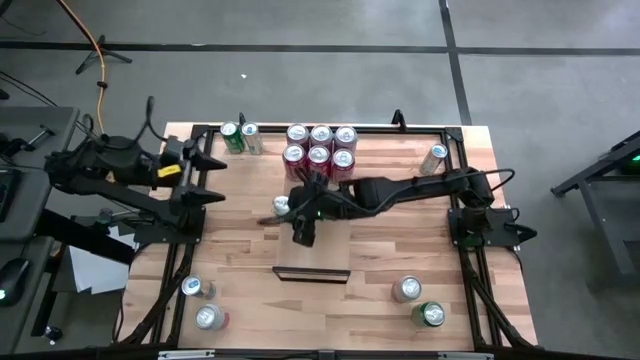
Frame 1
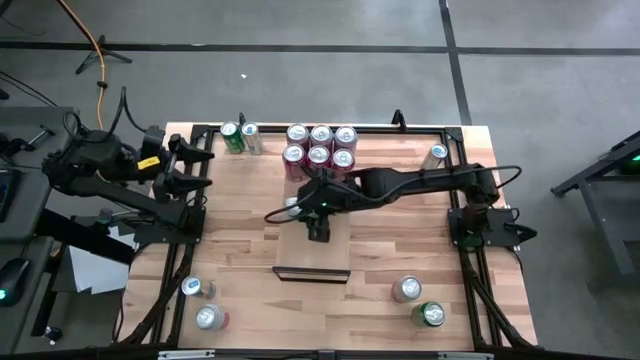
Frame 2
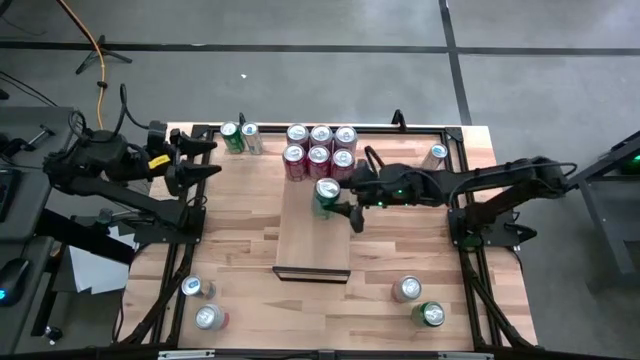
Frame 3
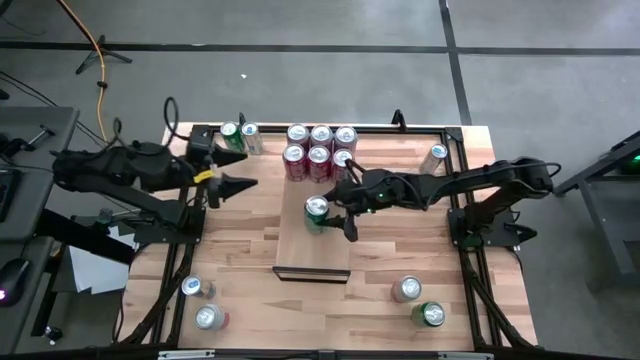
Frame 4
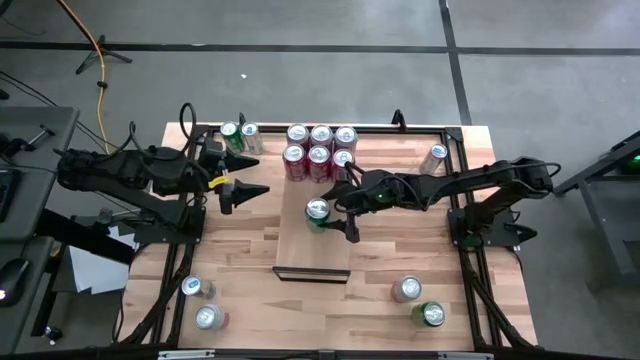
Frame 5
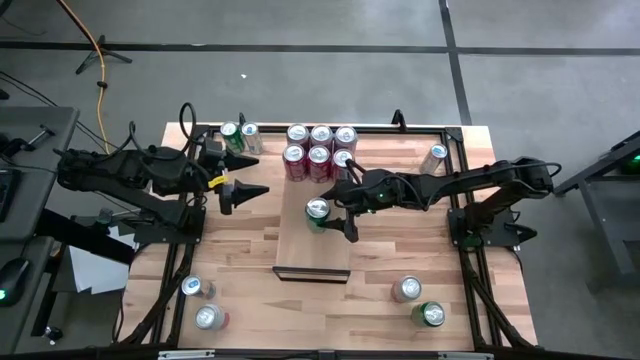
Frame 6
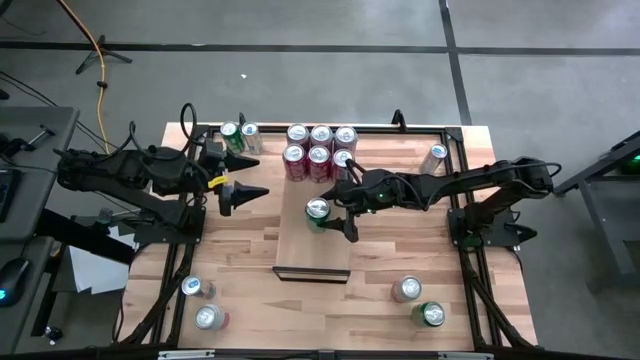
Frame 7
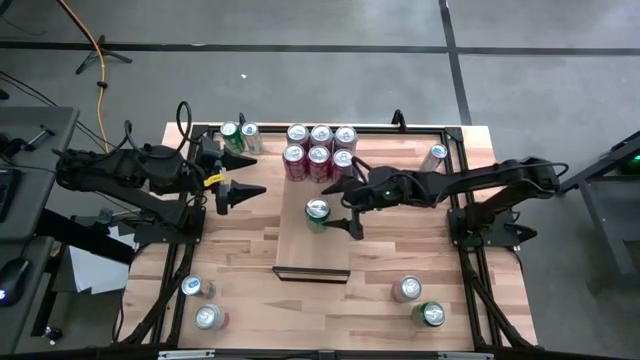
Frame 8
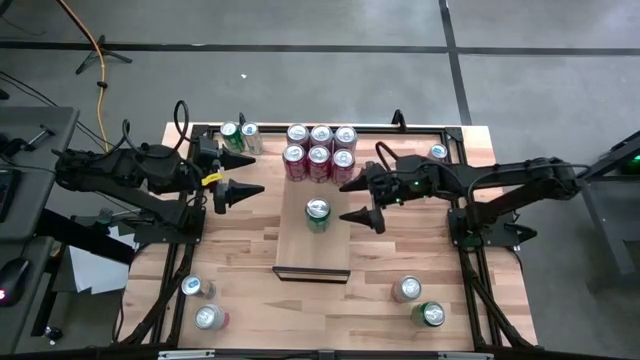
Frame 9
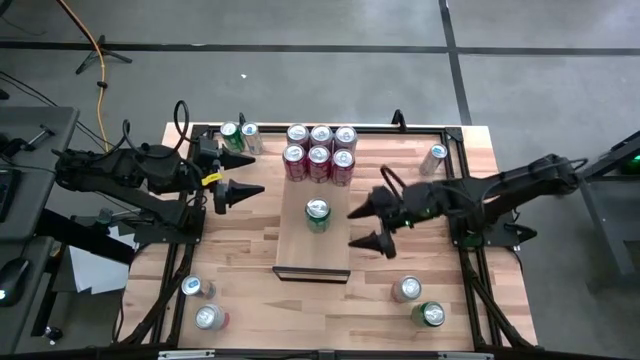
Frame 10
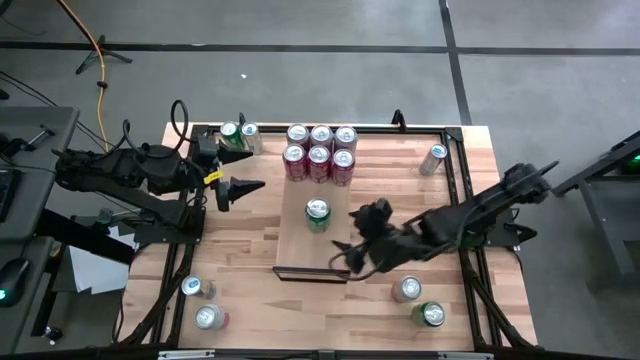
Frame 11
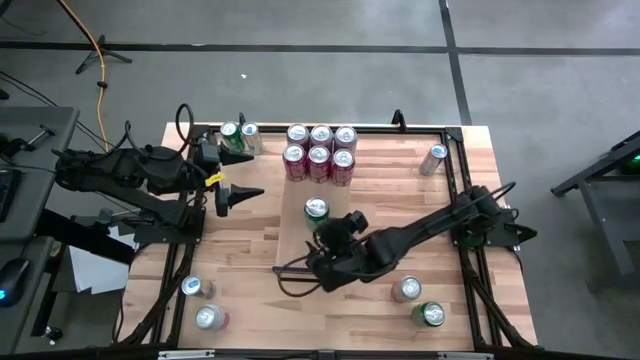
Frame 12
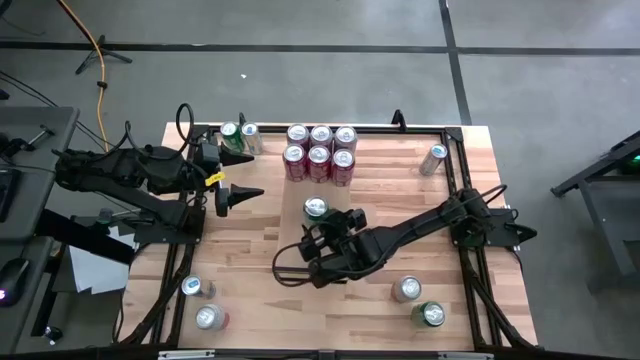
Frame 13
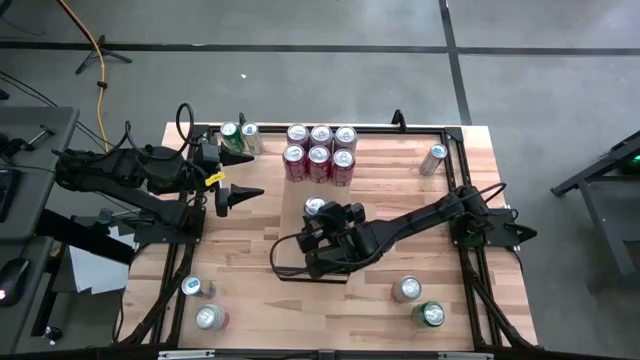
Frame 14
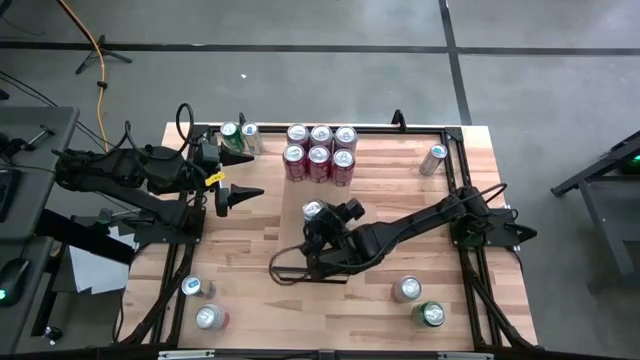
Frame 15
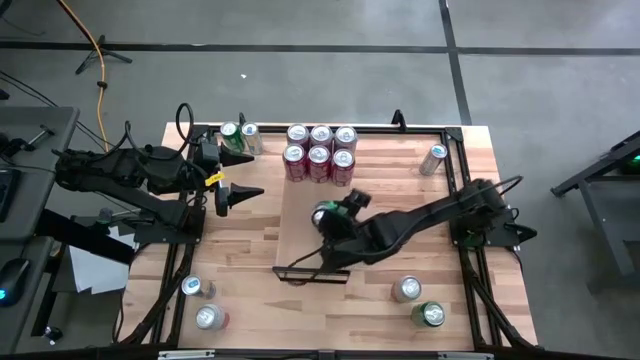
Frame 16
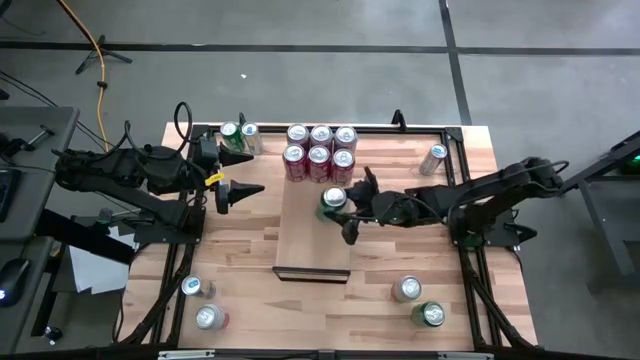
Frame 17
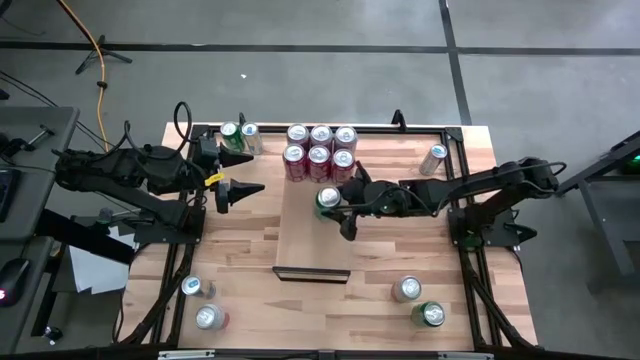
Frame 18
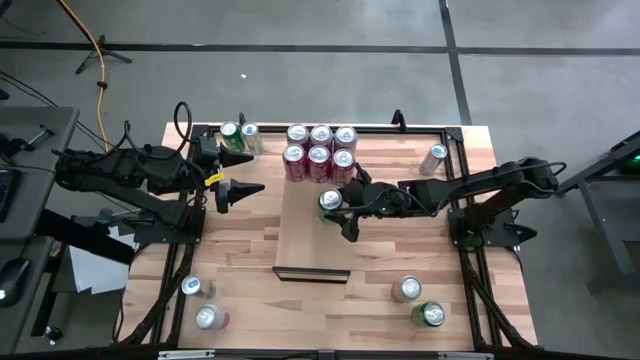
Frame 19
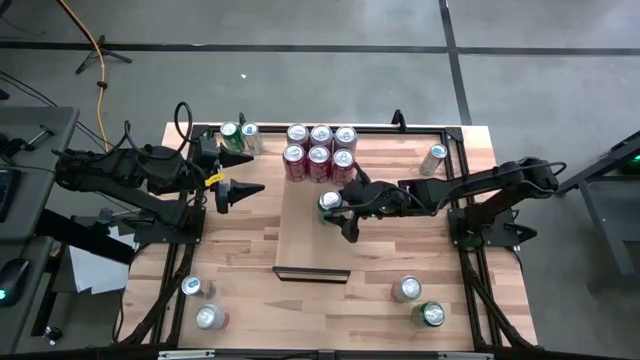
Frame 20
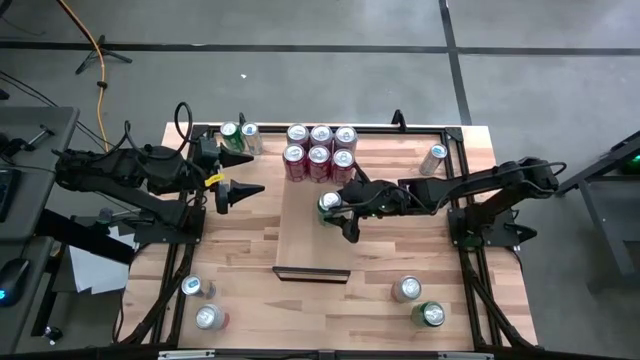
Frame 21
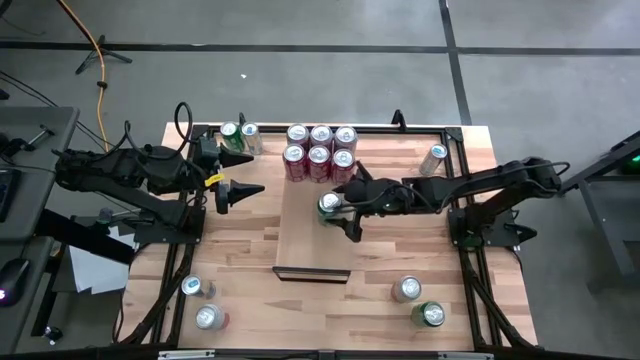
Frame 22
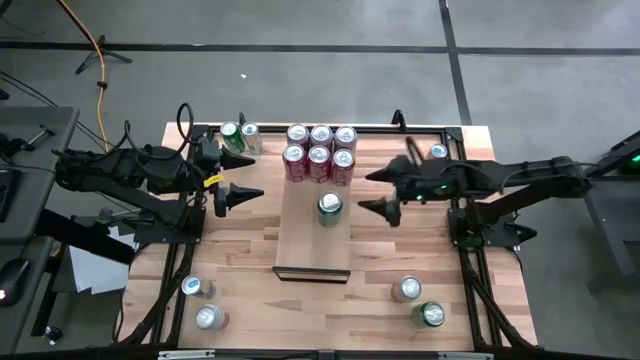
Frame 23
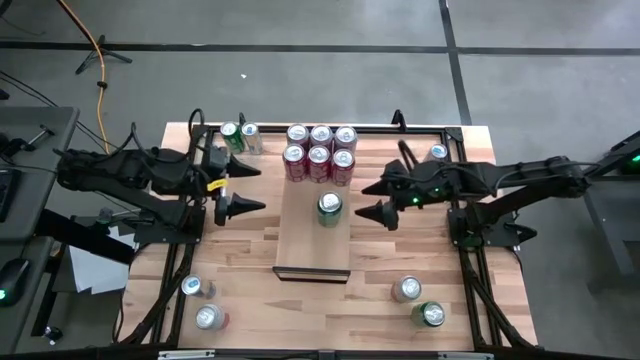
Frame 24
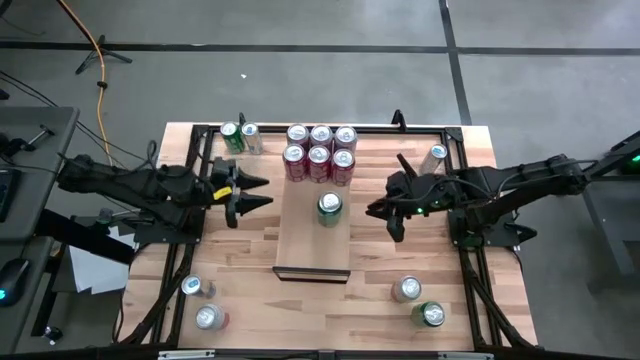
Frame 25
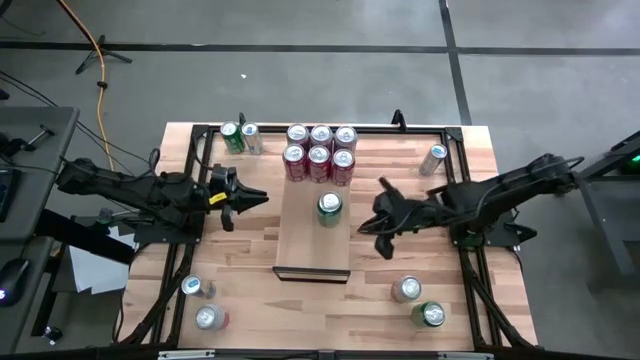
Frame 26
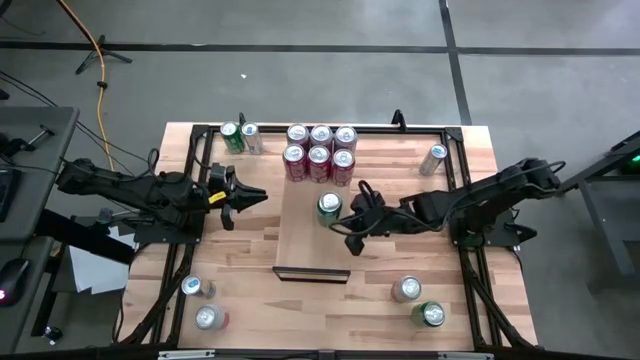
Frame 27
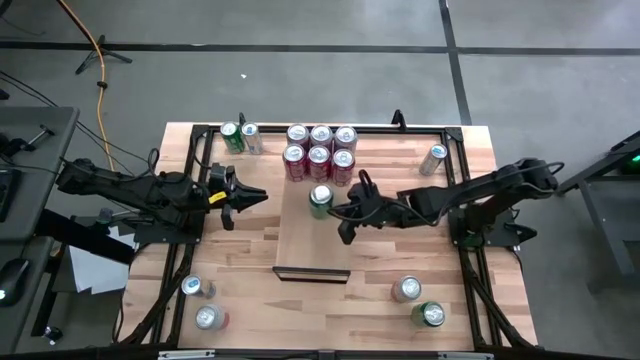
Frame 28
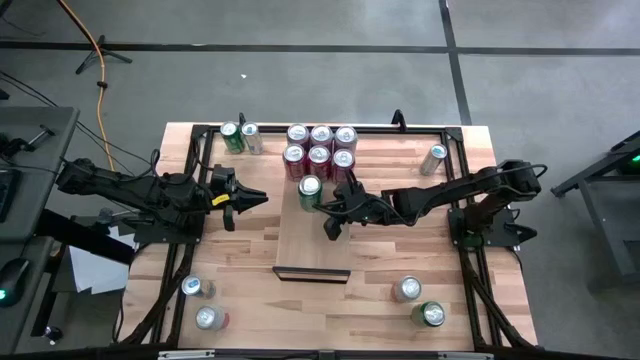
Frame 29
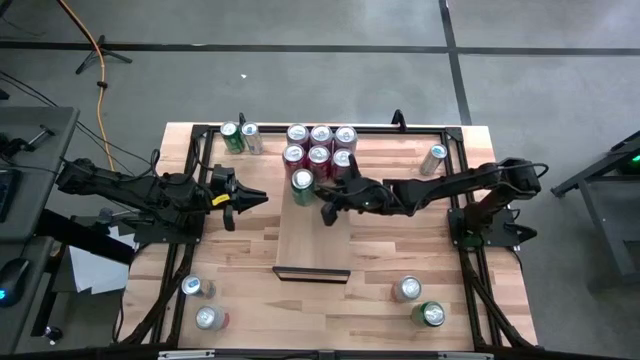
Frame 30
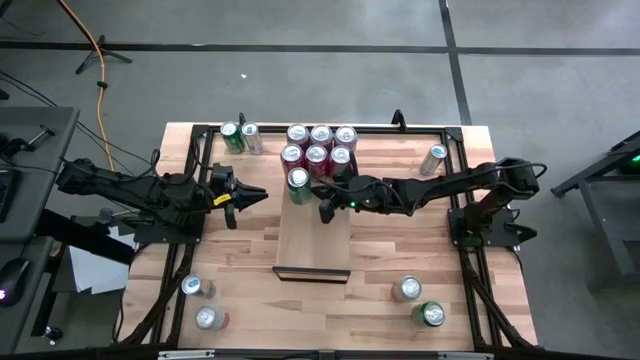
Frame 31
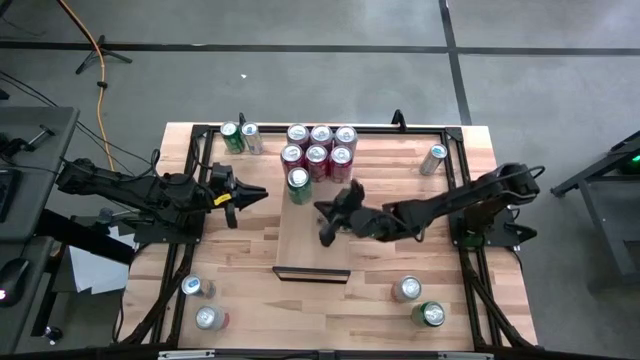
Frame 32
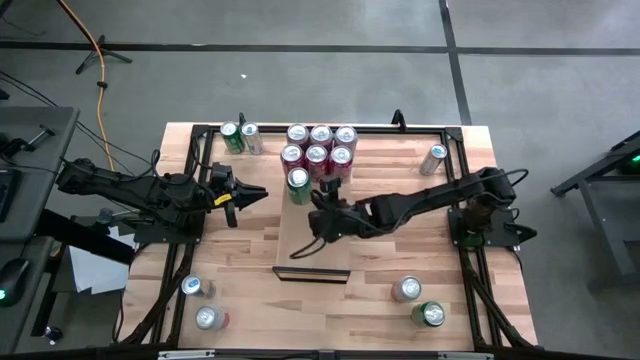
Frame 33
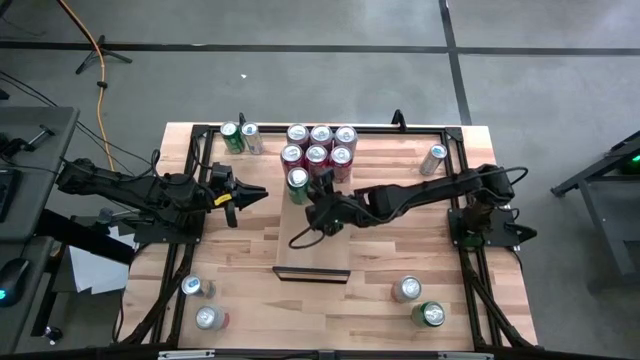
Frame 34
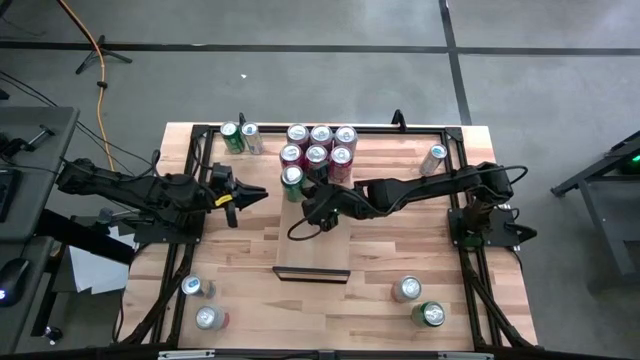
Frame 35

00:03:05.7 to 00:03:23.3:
Task: Place canned beverage on shelf
Put the bottom left green soda can on the shelf

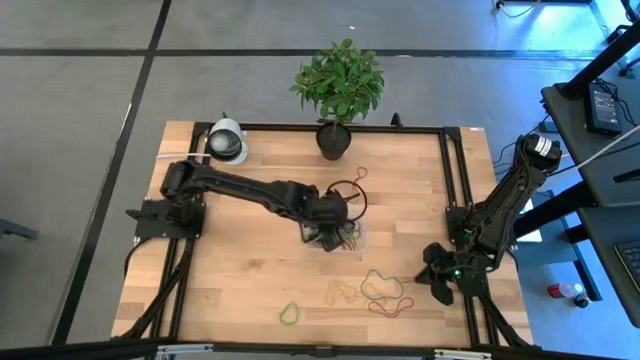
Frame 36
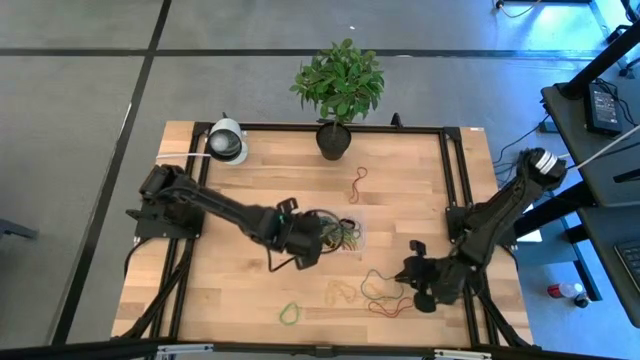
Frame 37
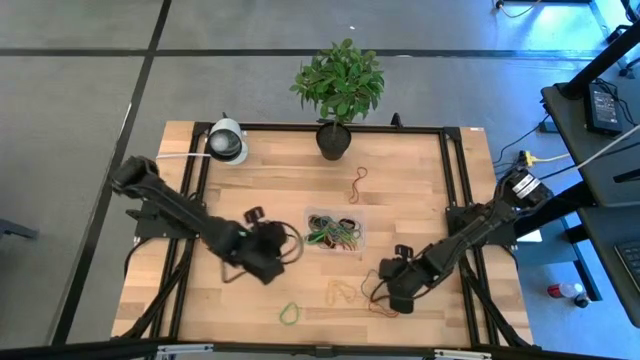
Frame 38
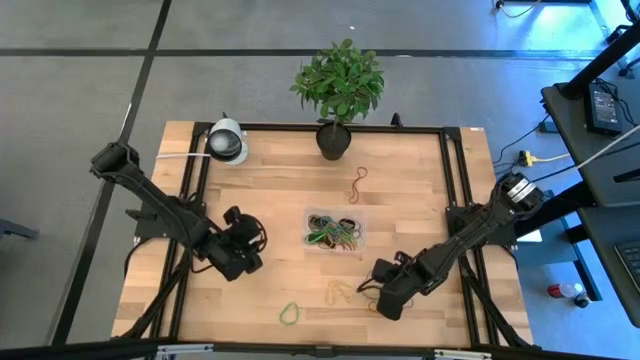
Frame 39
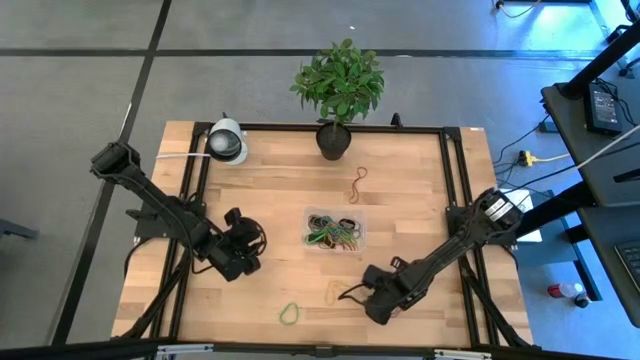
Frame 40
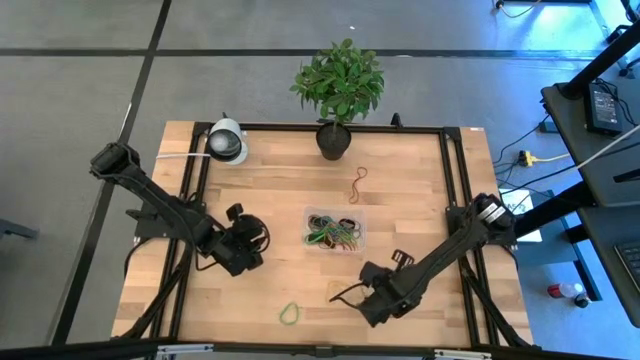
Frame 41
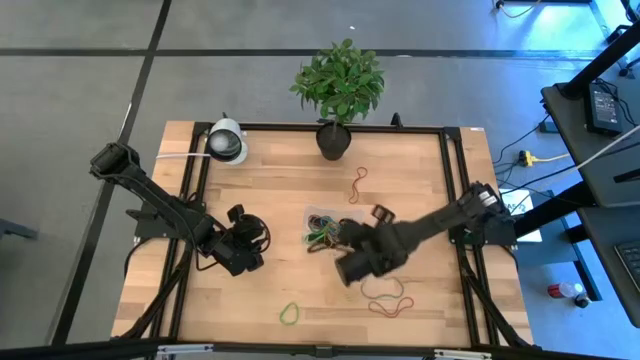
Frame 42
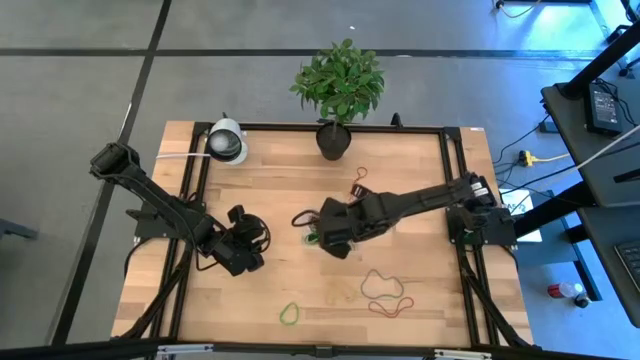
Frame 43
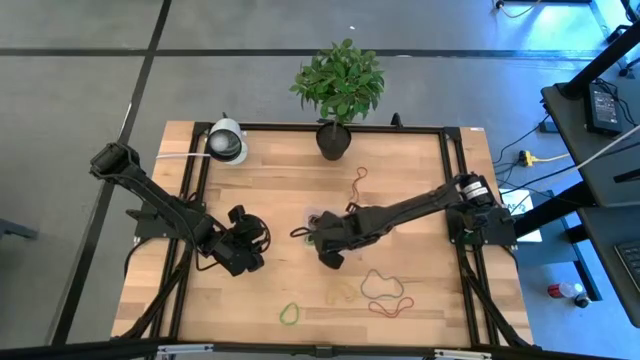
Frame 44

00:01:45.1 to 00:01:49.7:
Task: Pick and place rubber bands into bin
Put the yellow rubber band into the bin
